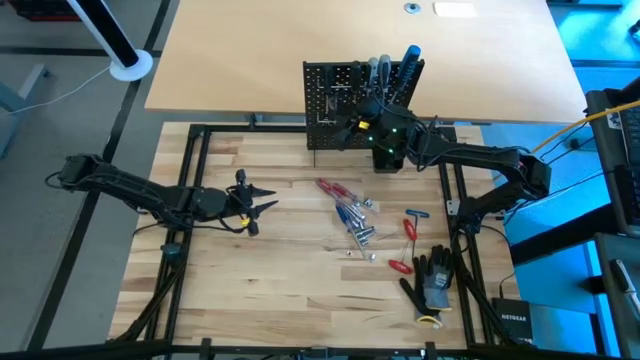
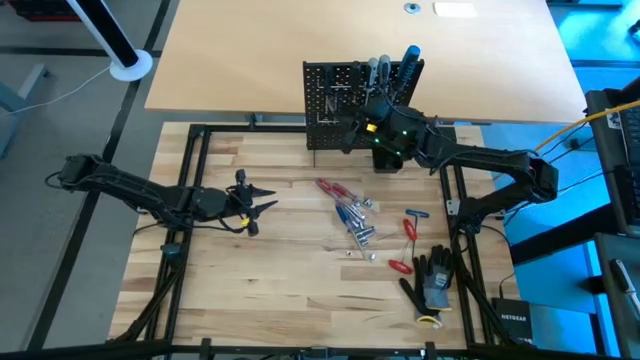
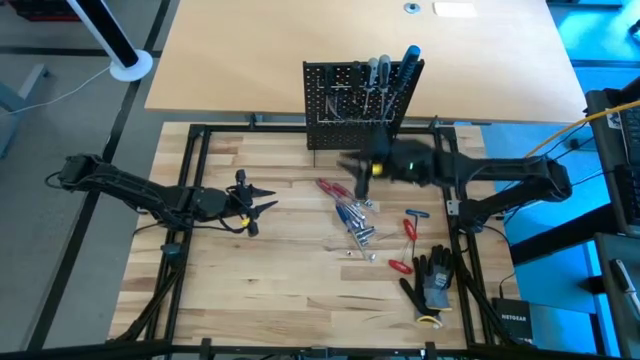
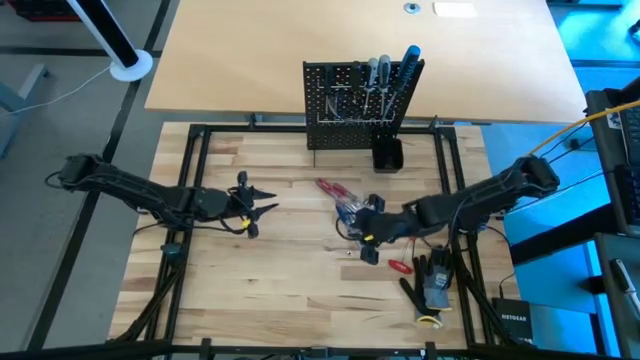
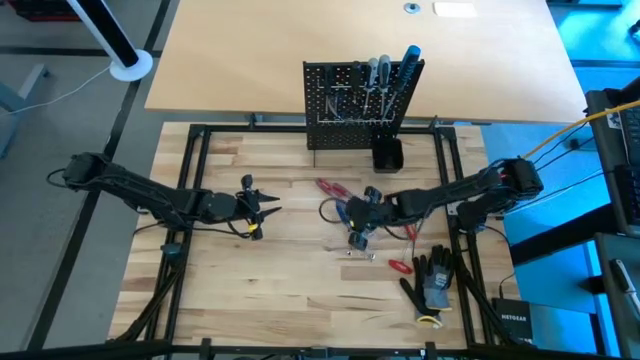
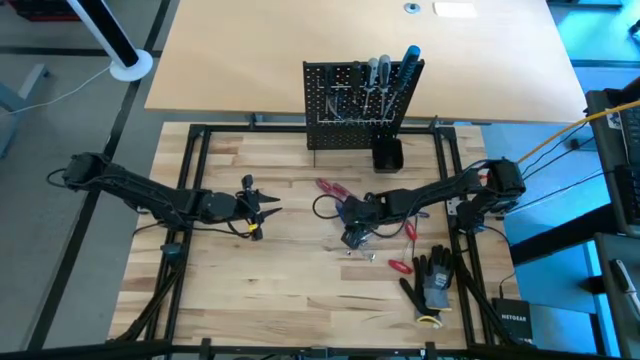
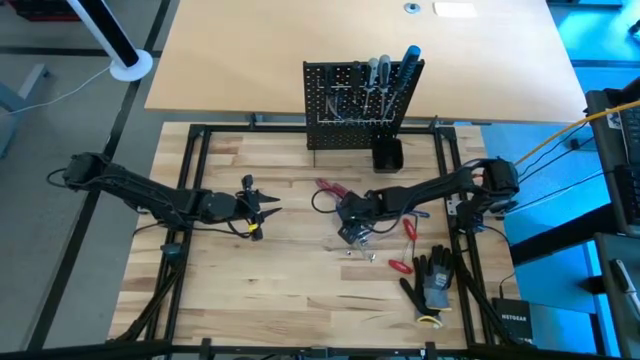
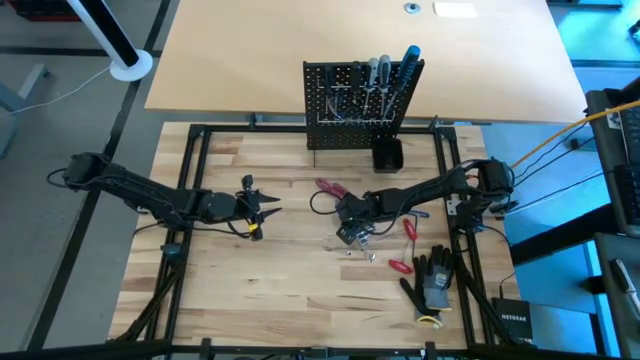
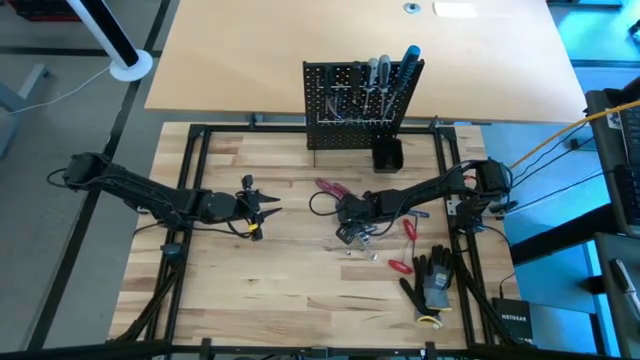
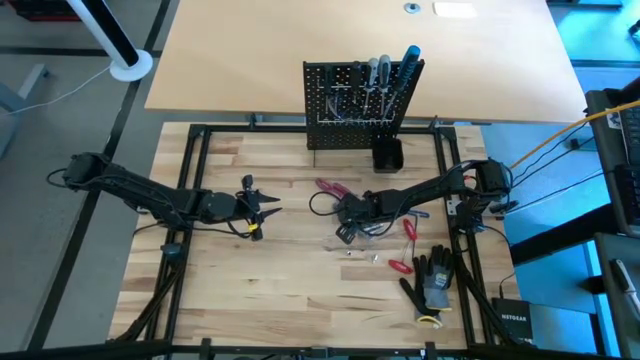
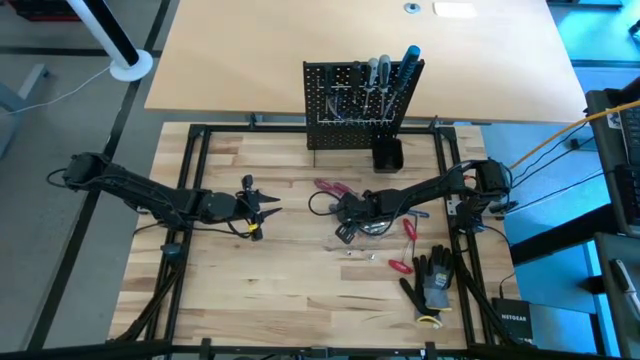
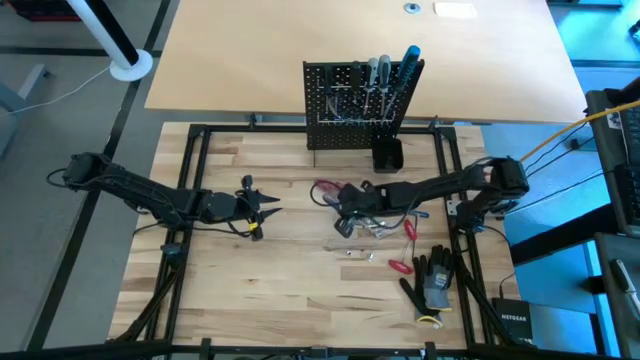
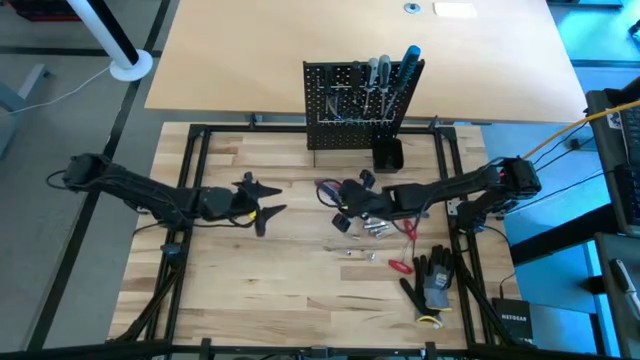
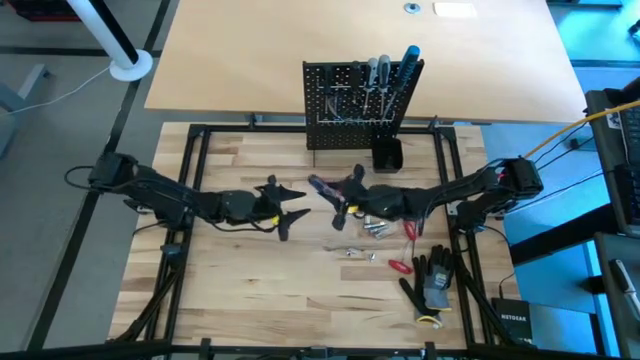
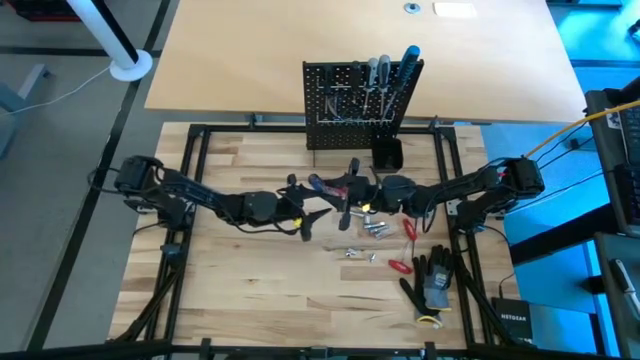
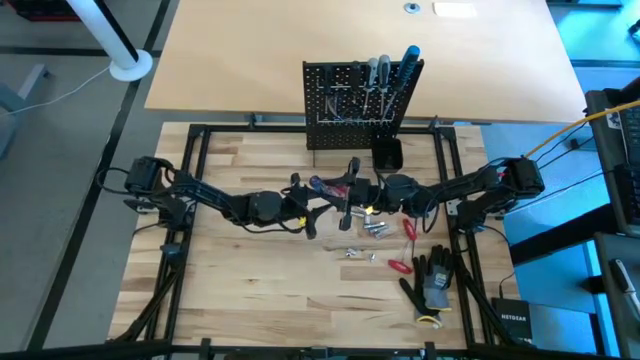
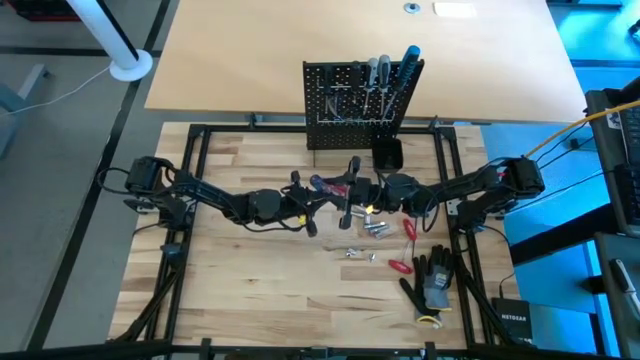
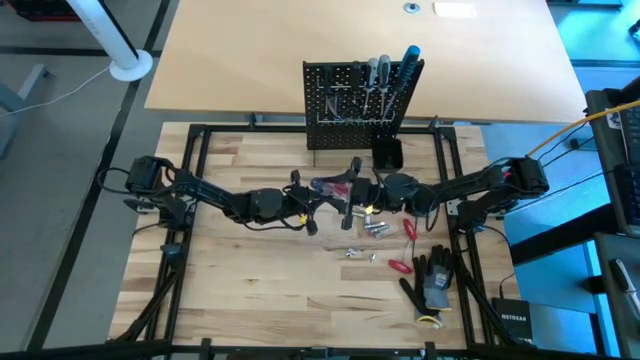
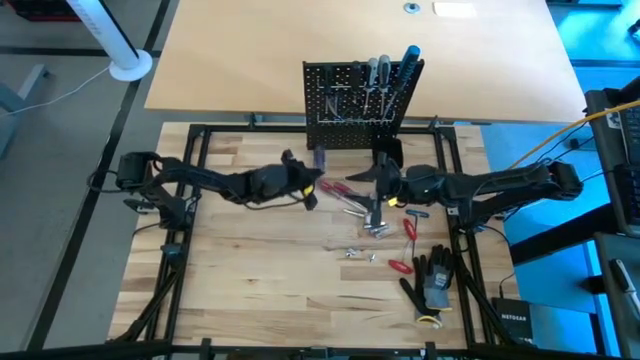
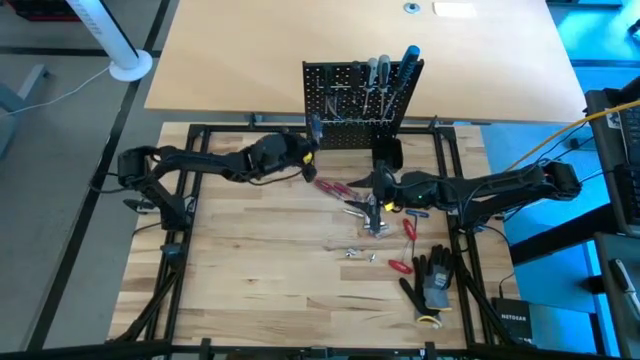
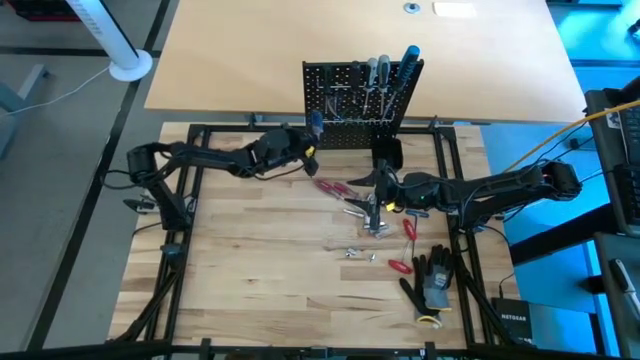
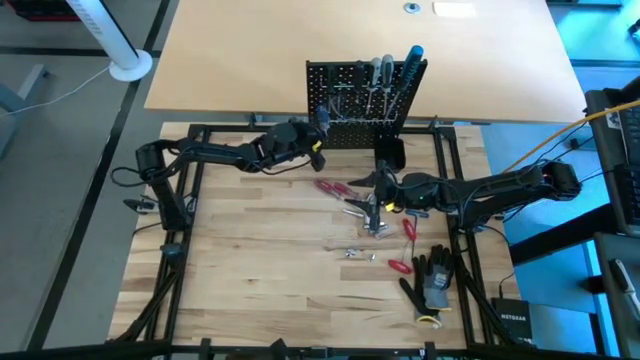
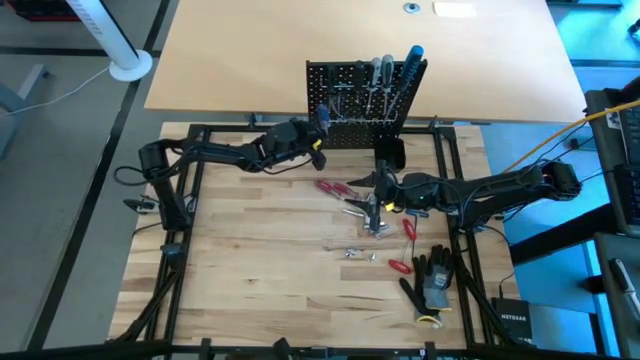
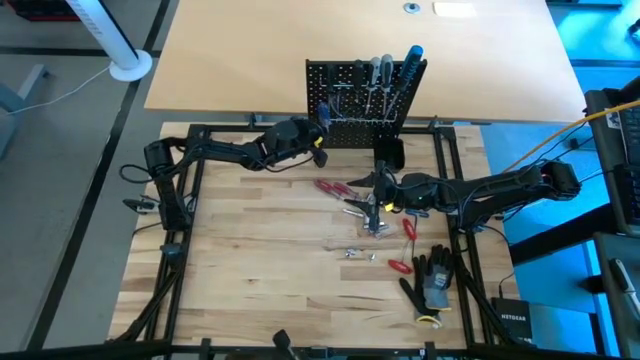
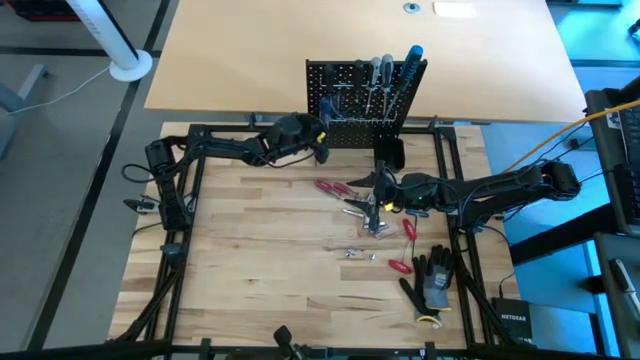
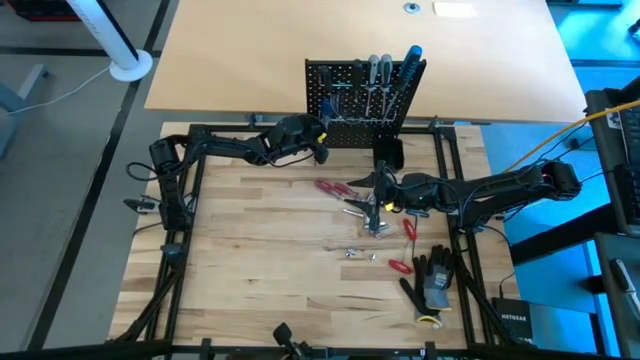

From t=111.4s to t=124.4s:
Task: Hang tools onto peg board
Hang the blue transparent screwdriver on the peg board

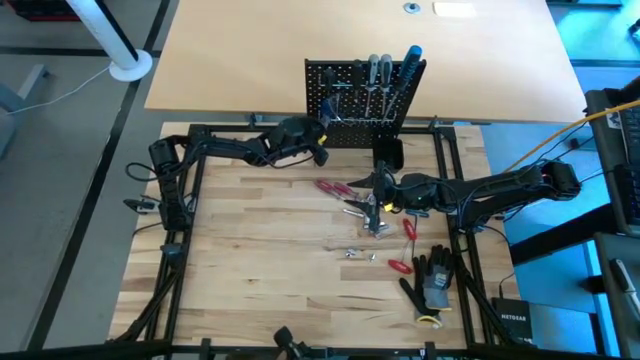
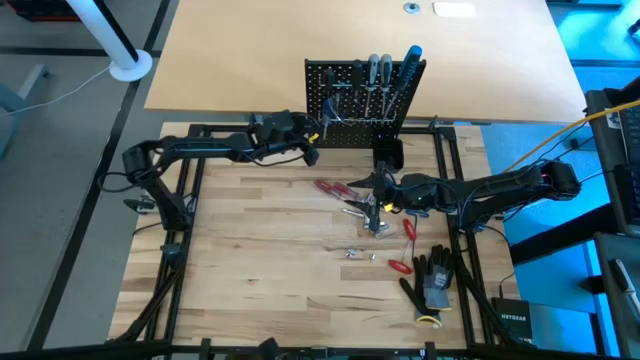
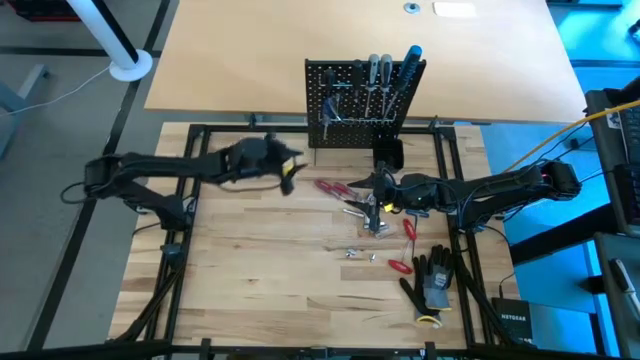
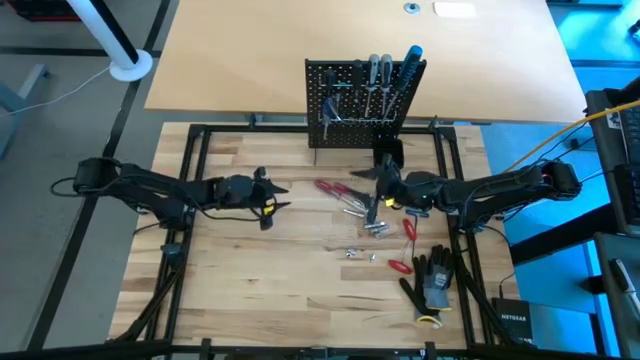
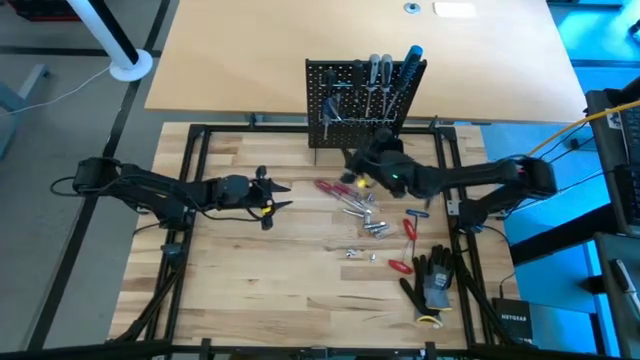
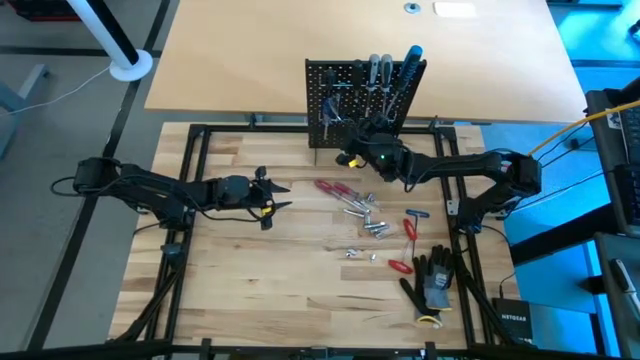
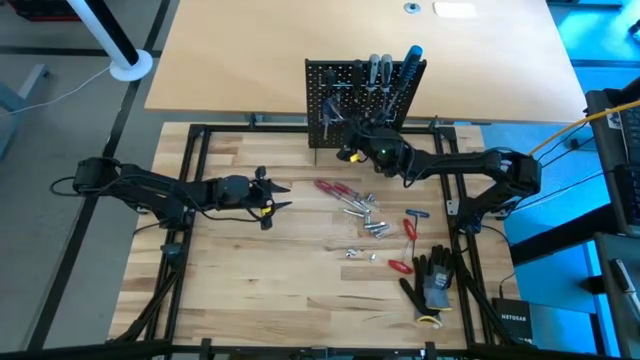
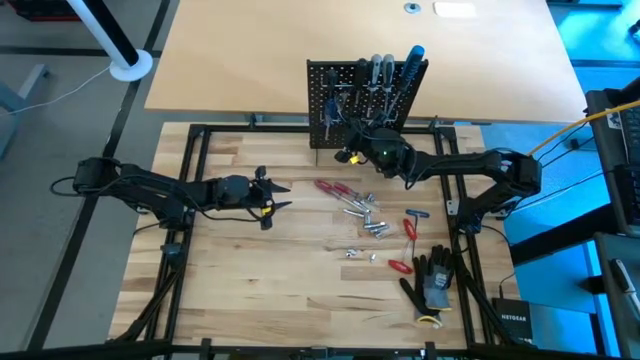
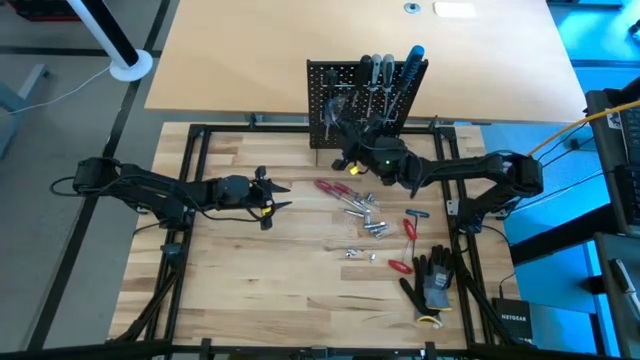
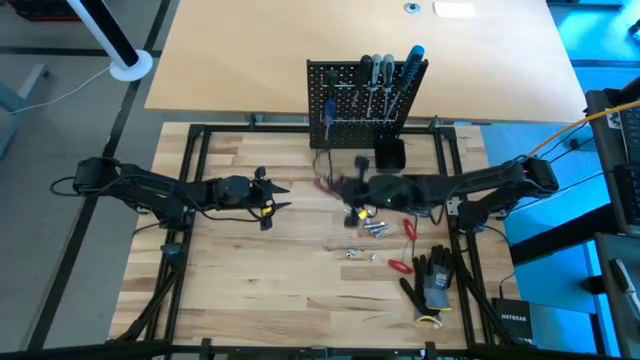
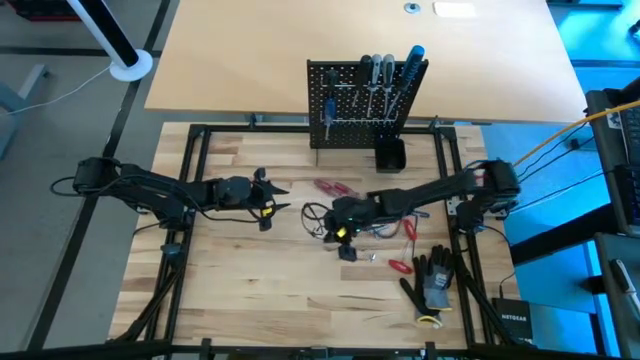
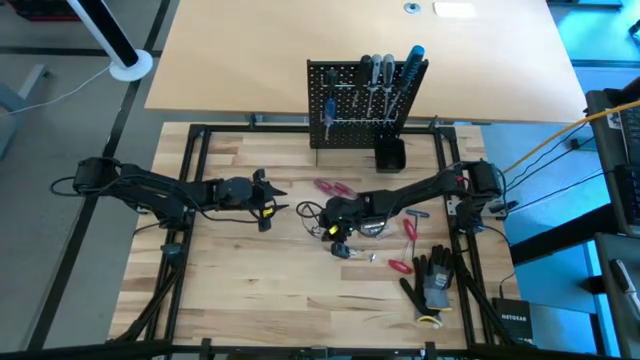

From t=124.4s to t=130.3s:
Remove the black safety glasses from the peg board

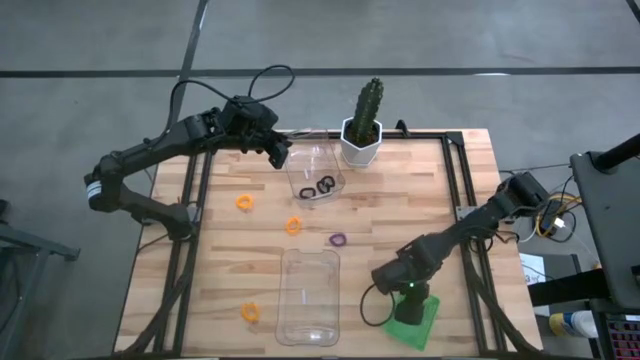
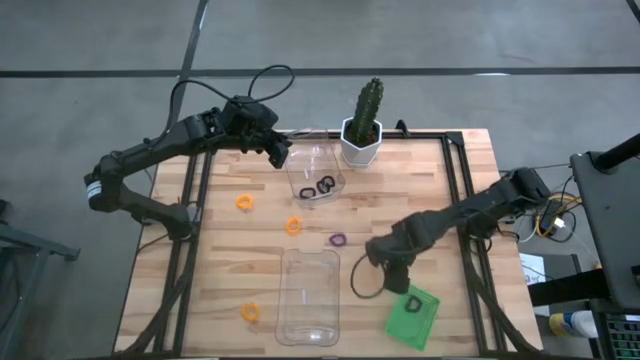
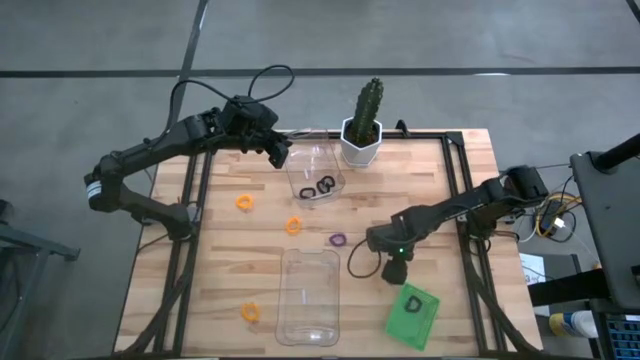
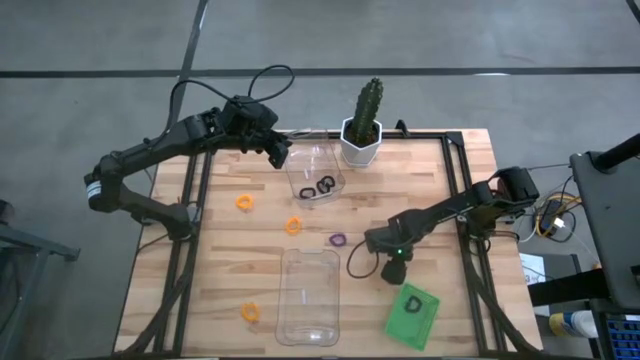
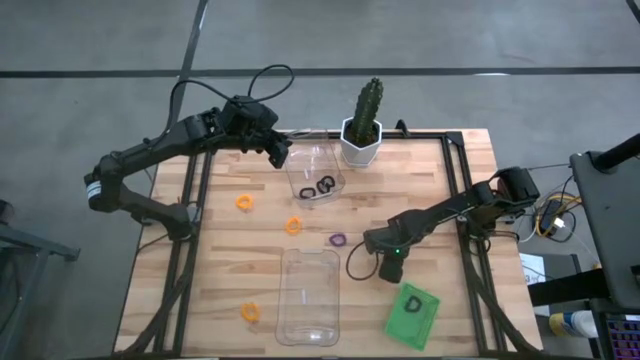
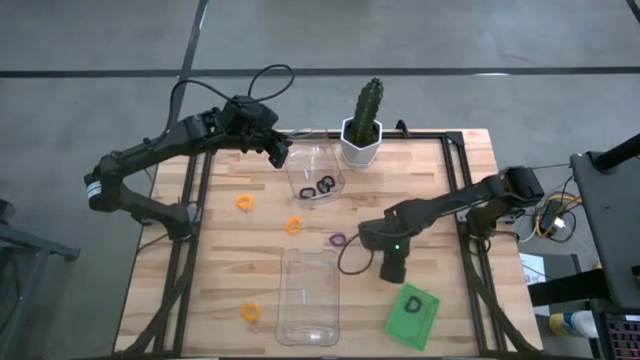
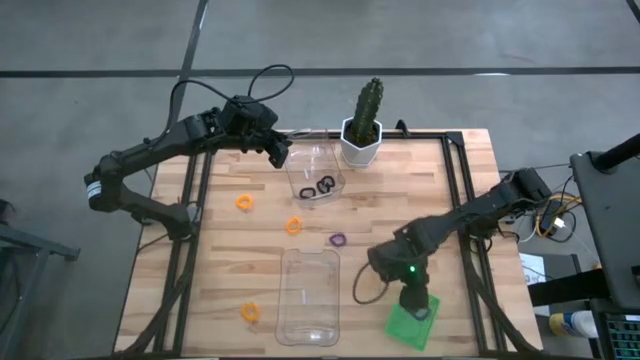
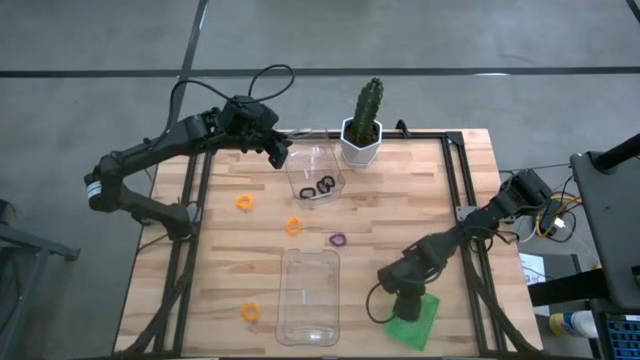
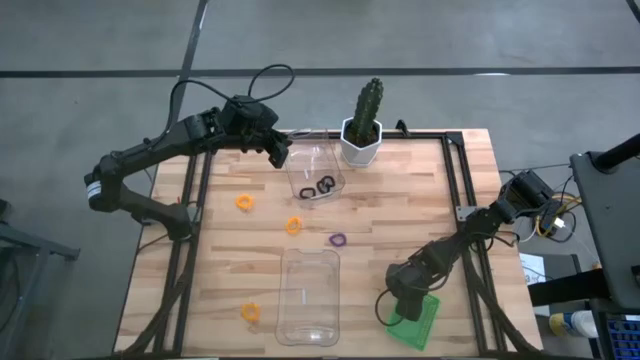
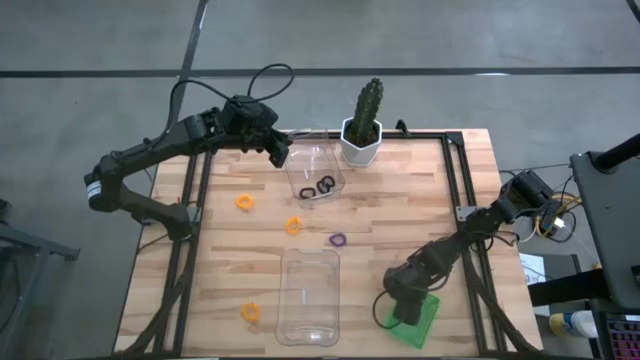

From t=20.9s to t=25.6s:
Task: Sort spring keychains
Put the right purple spring keychain into the green bin
